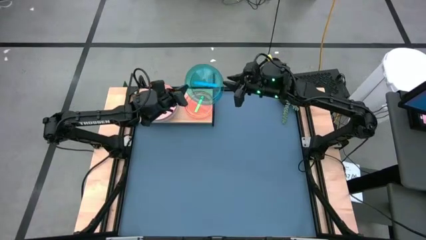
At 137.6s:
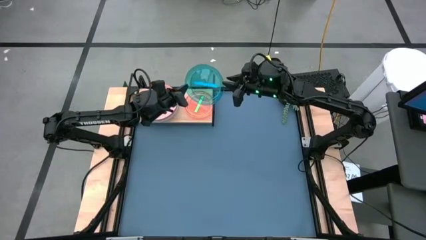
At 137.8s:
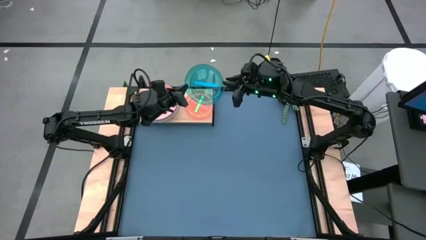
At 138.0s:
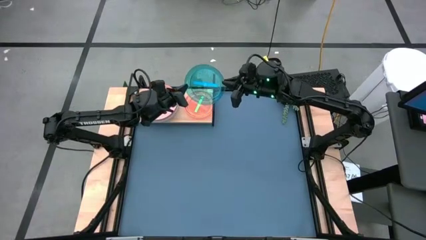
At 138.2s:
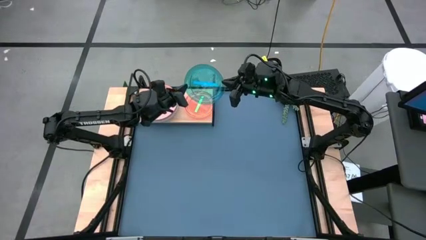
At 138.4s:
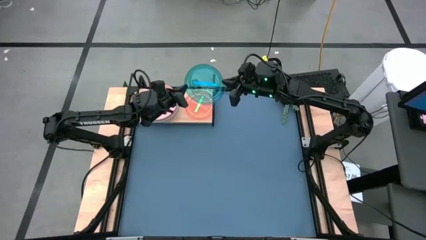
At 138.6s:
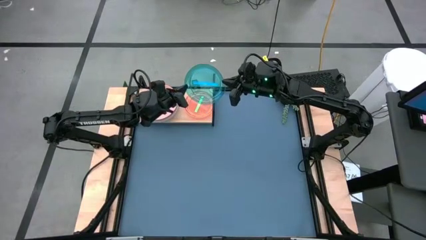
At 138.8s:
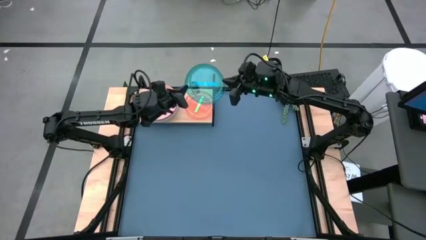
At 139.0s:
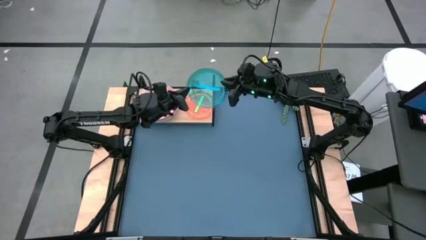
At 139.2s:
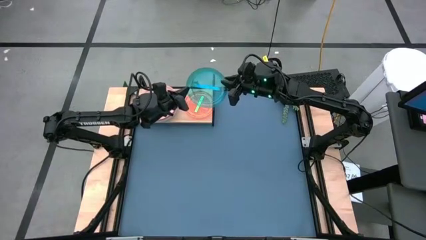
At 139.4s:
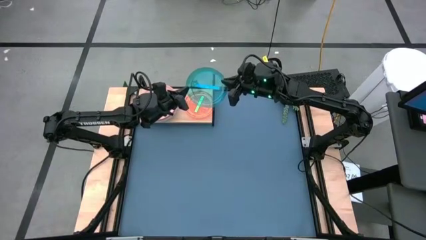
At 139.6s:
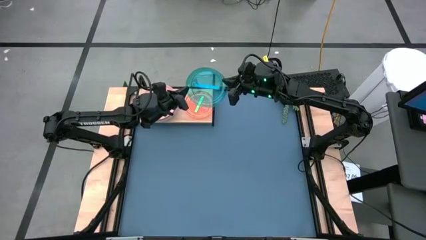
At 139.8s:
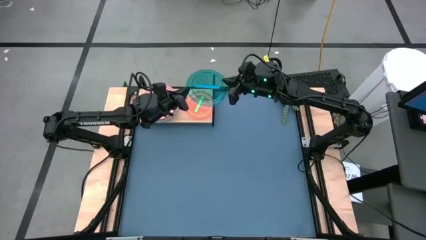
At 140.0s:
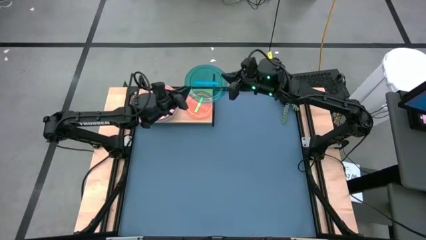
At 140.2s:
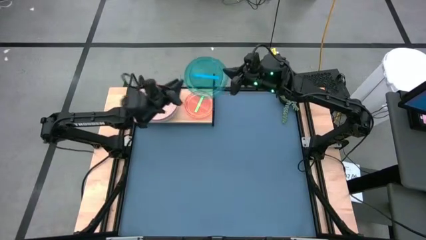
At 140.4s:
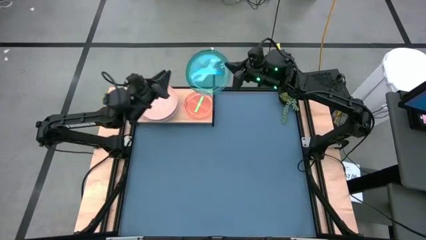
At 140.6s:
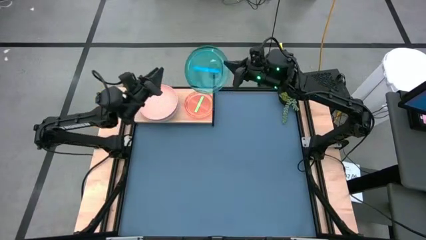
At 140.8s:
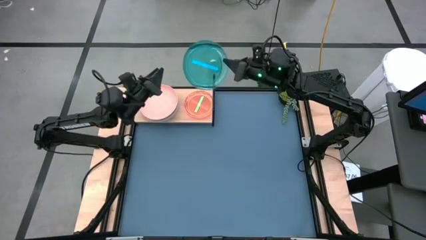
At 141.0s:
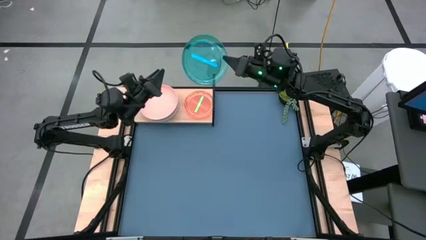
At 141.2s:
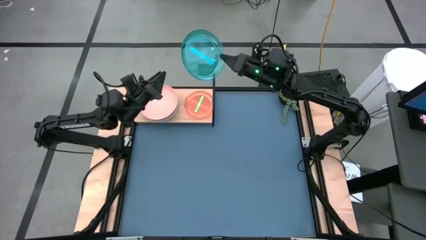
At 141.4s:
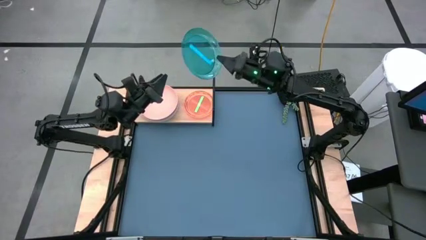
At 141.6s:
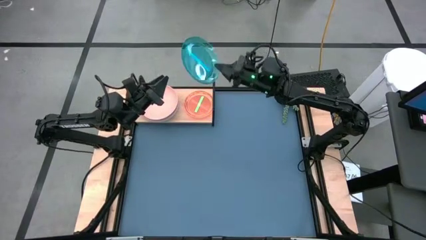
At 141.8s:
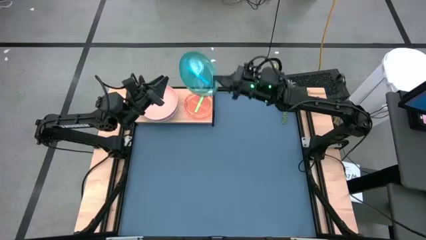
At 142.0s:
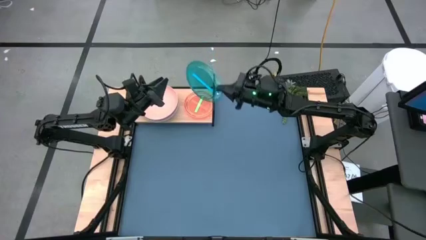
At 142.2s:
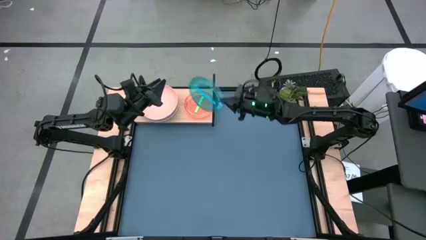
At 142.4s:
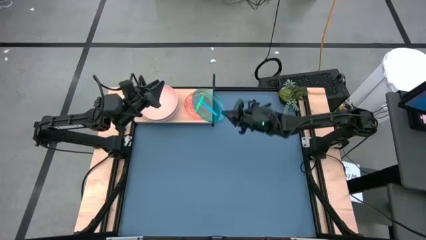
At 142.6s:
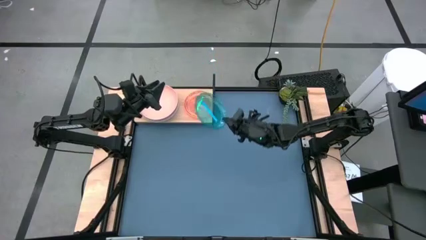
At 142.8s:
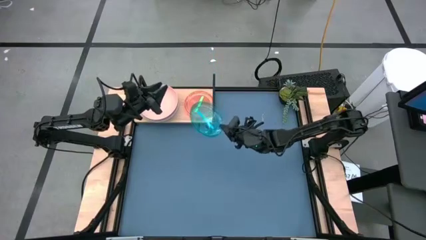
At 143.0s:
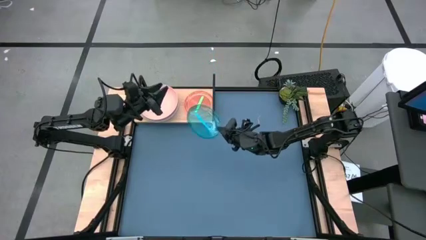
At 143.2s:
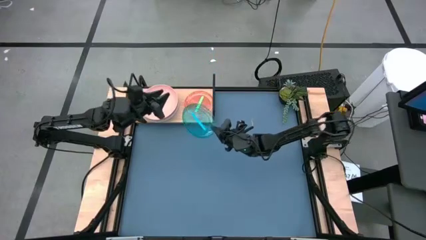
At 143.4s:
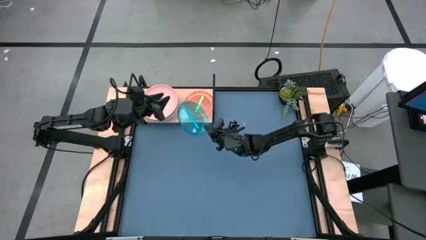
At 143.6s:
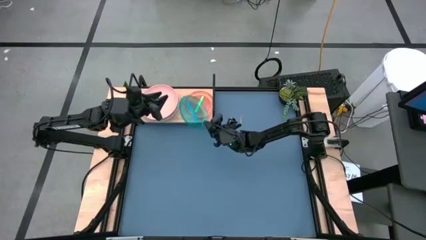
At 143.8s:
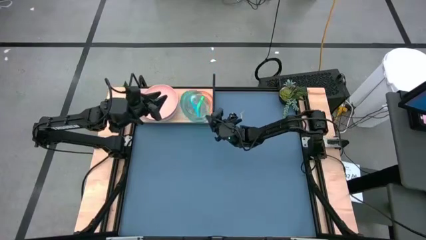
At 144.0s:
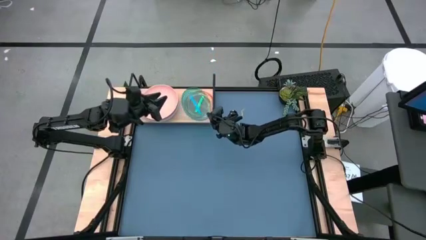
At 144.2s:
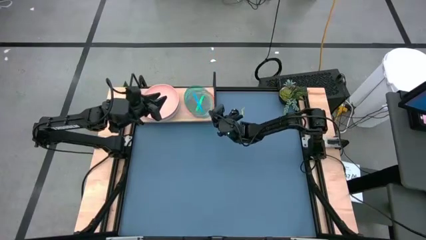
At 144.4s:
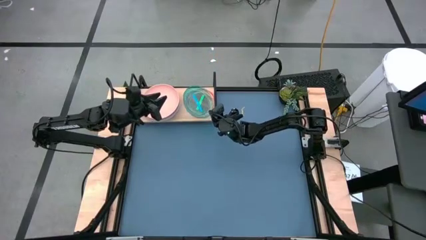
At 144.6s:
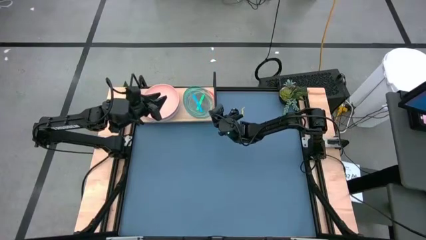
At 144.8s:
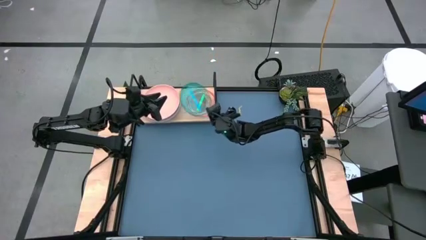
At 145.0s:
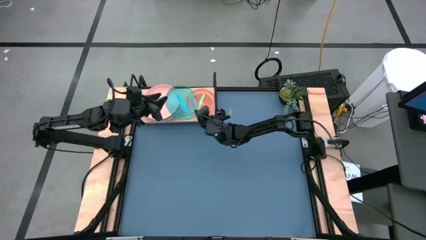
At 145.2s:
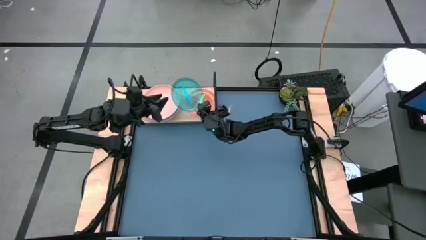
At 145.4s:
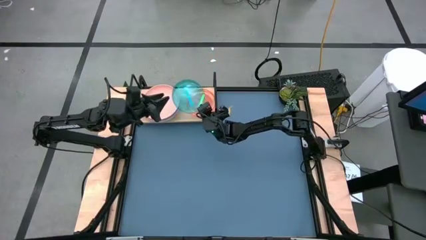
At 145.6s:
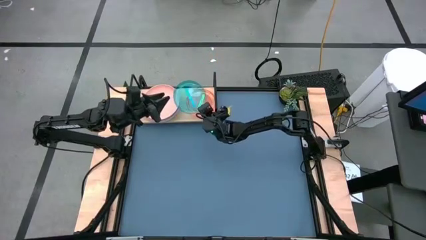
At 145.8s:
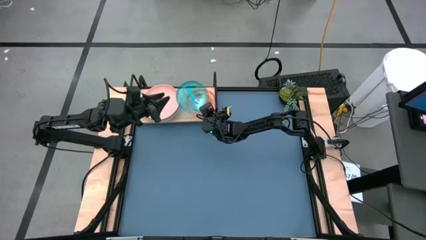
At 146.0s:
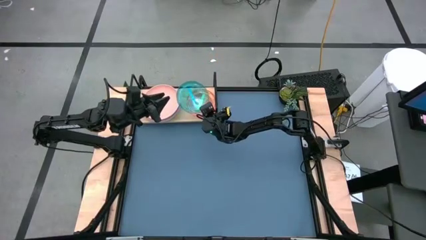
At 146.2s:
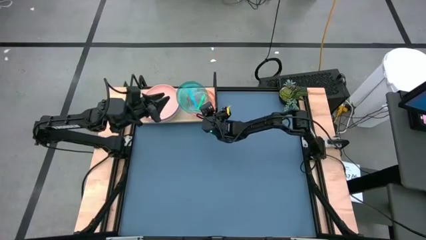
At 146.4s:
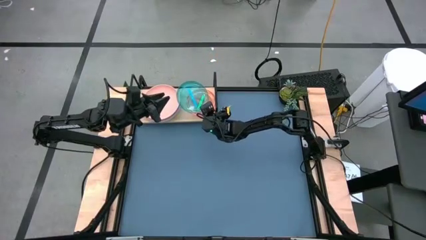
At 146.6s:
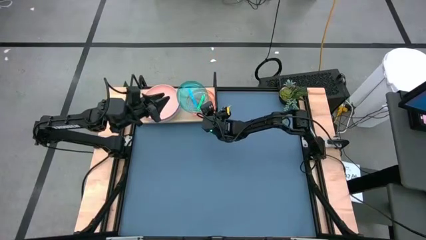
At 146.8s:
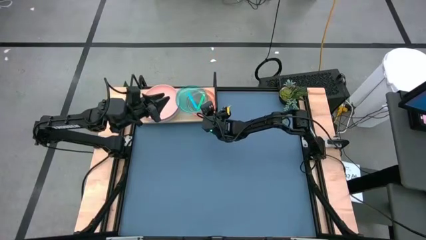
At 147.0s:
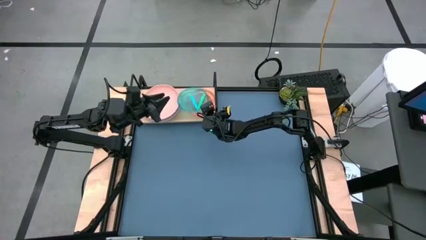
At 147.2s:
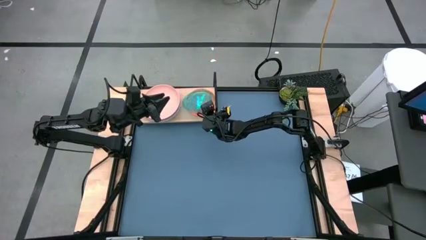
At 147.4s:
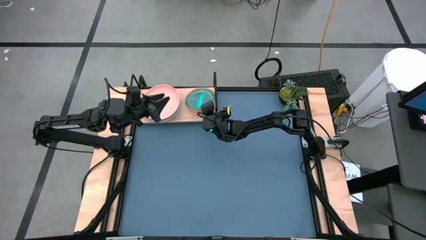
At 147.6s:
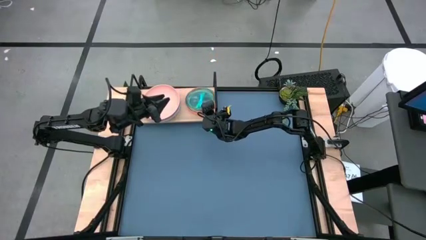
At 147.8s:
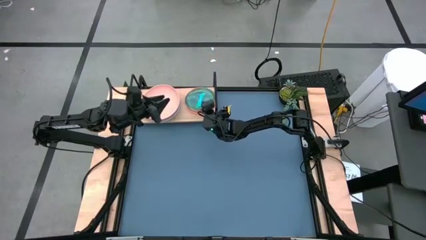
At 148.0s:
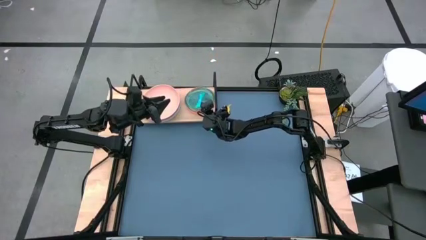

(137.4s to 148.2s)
Task: Place and stack plates onto a shelf
Stack the blue plate on top of the green plate on the shelf

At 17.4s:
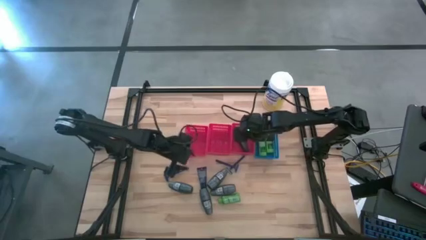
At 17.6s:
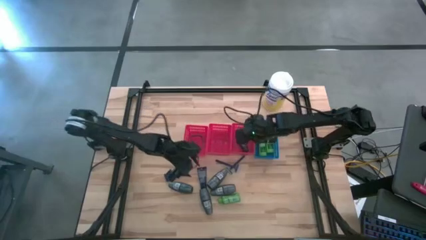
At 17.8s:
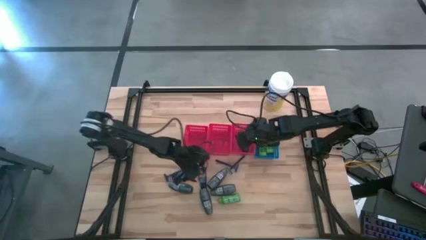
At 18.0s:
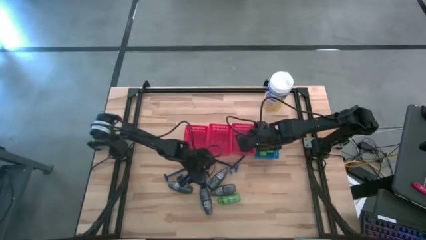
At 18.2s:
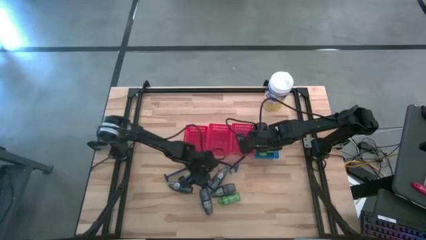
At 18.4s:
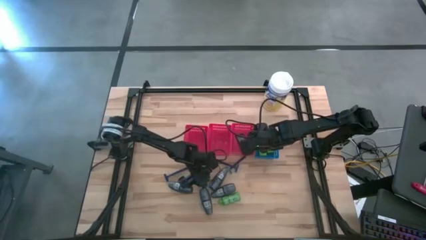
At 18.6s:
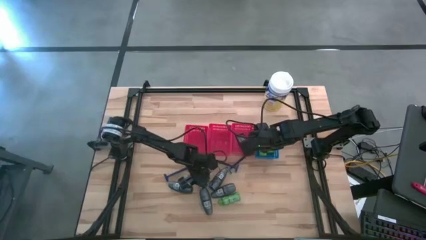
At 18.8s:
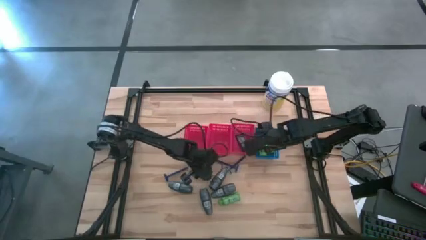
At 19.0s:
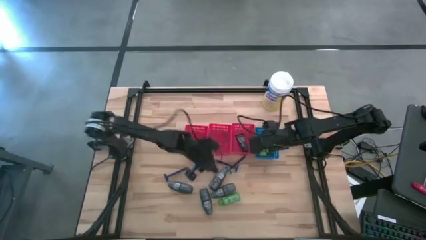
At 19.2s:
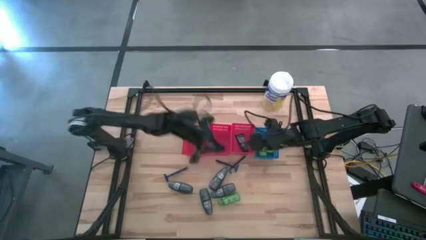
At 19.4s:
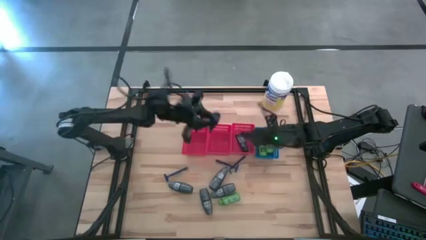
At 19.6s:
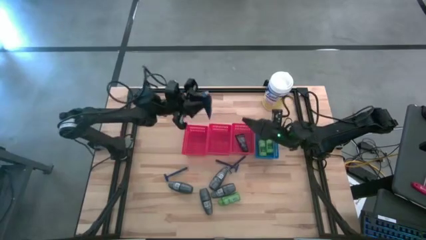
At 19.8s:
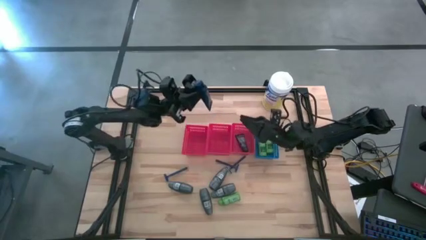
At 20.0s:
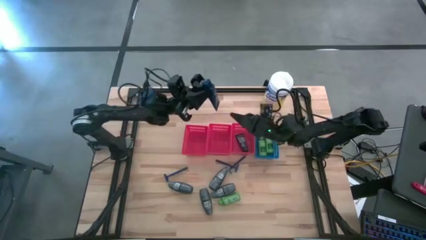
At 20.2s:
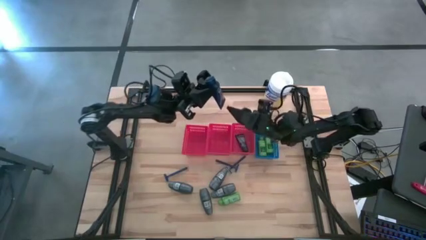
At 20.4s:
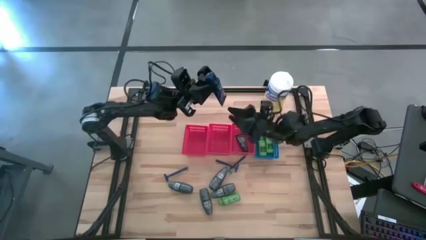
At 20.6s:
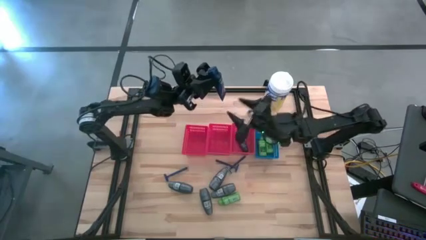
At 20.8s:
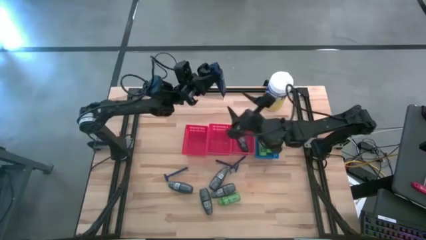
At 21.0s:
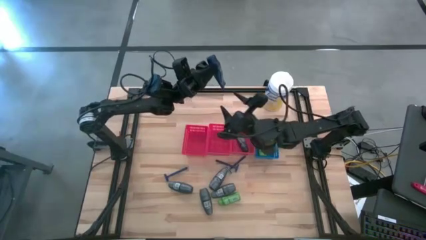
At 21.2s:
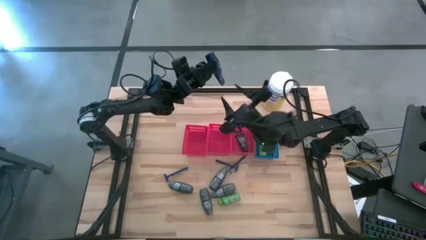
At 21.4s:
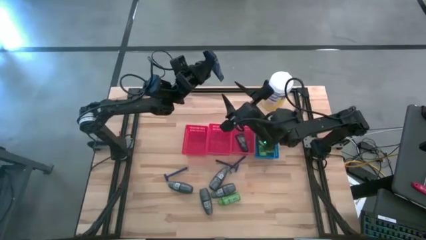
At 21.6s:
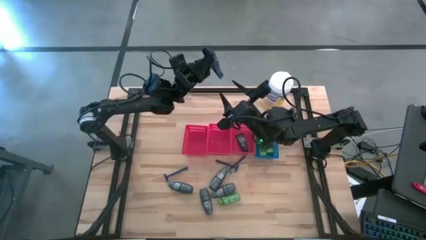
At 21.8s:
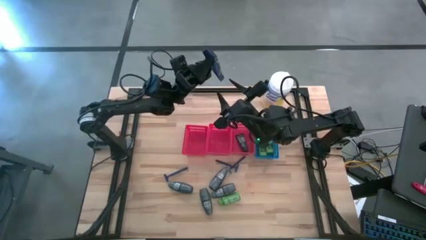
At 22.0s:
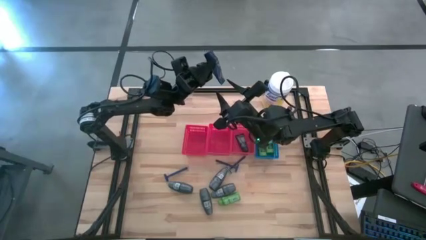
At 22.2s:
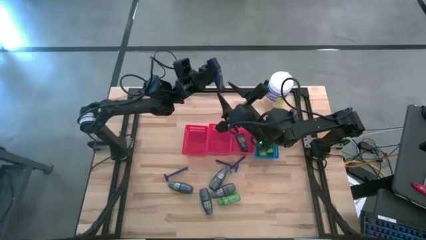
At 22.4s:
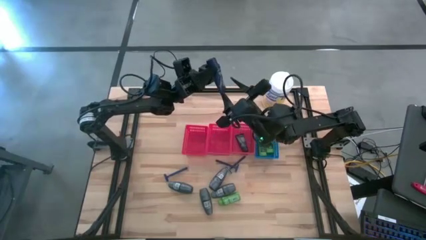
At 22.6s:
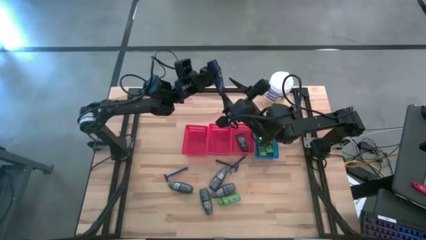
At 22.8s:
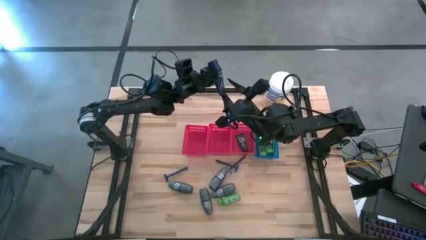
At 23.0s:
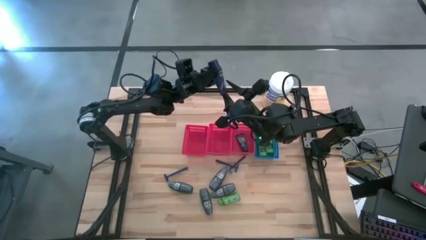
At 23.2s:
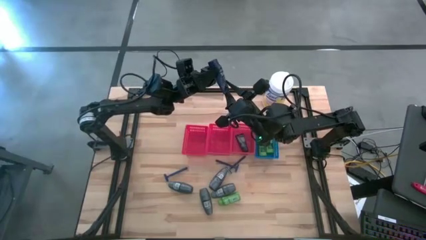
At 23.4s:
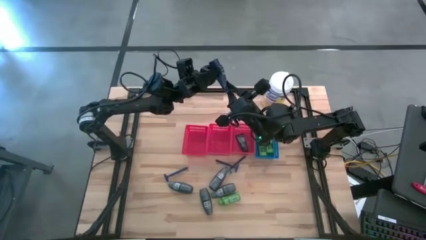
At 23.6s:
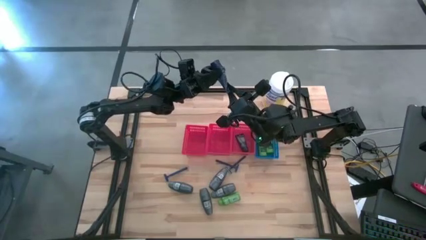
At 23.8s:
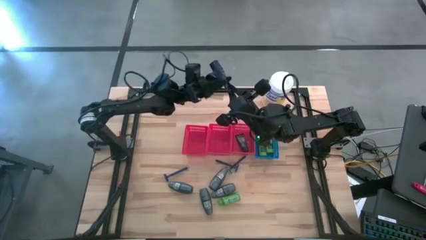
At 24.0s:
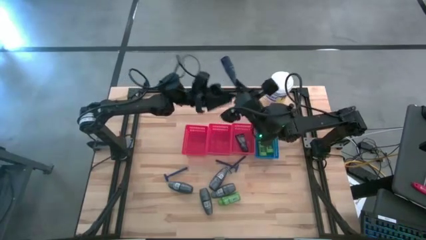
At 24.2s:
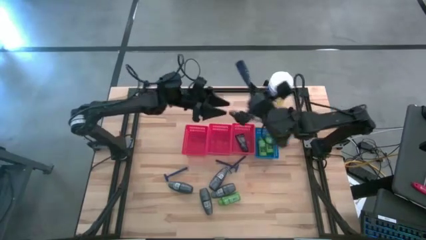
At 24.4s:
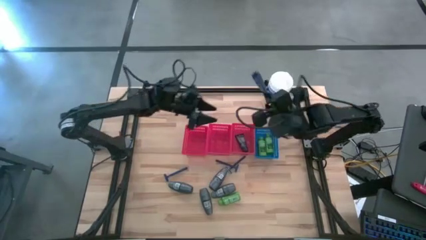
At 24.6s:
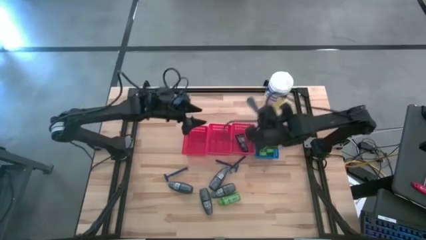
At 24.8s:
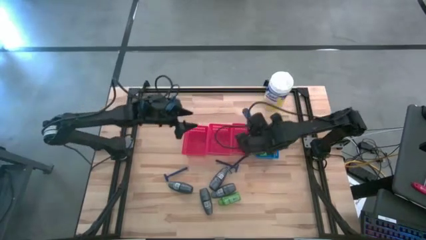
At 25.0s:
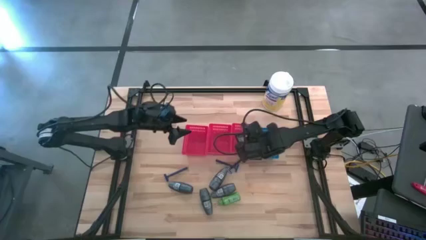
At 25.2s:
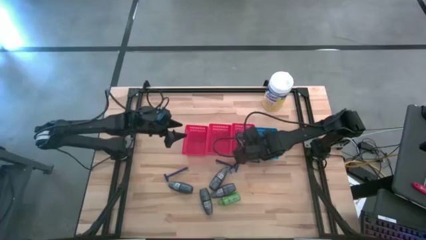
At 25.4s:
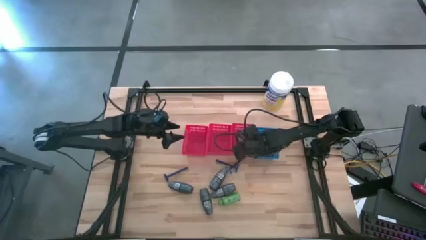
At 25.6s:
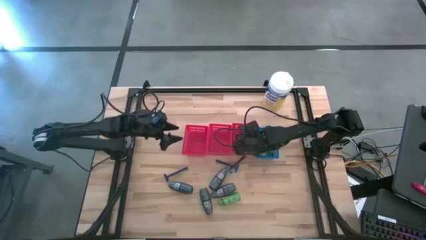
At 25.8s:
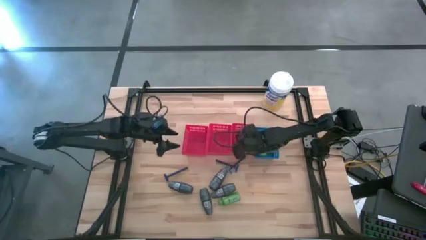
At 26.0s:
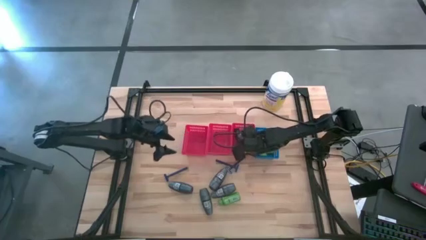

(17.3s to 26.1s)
Task: Pick & Place Travel size toiletries
Put the shave cream into the right red bin
